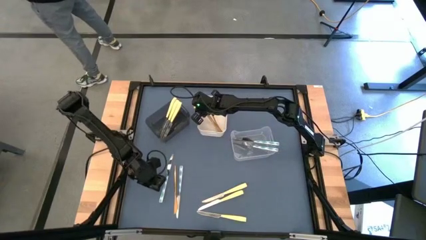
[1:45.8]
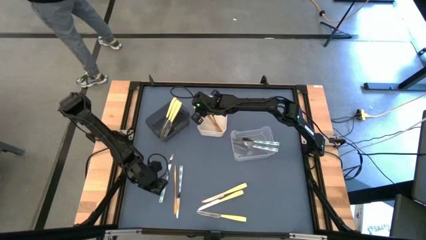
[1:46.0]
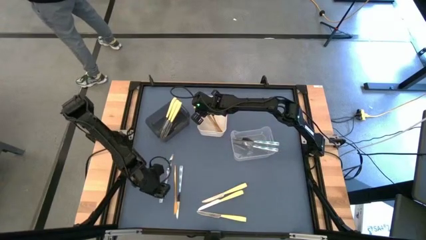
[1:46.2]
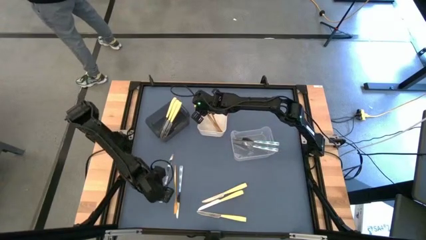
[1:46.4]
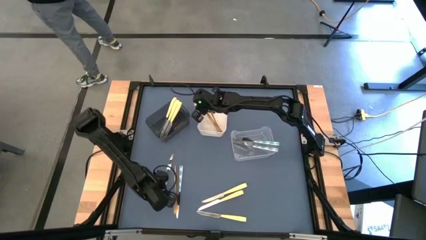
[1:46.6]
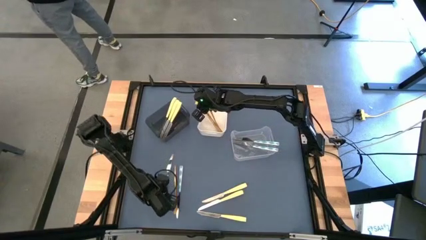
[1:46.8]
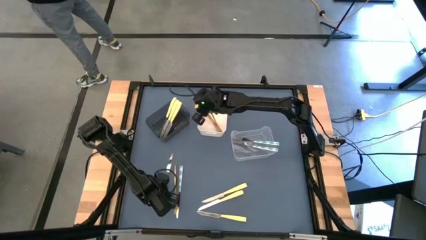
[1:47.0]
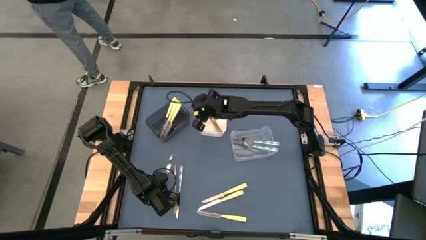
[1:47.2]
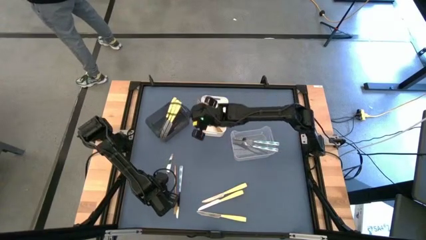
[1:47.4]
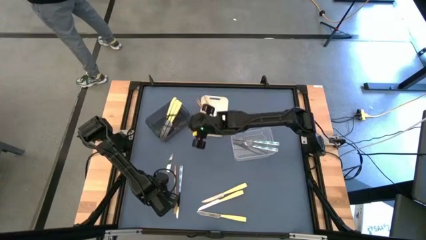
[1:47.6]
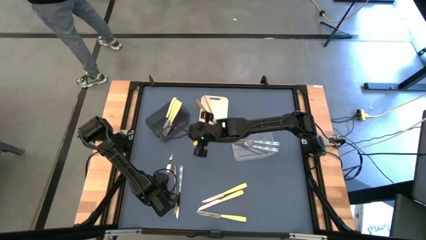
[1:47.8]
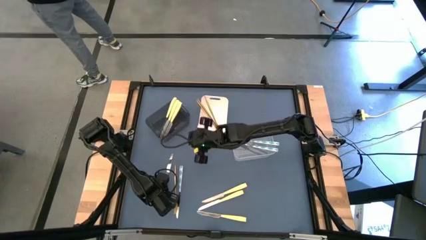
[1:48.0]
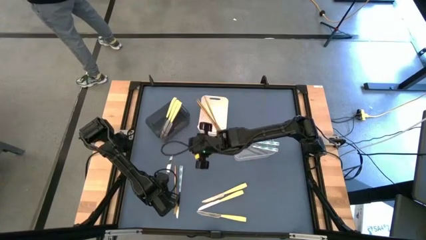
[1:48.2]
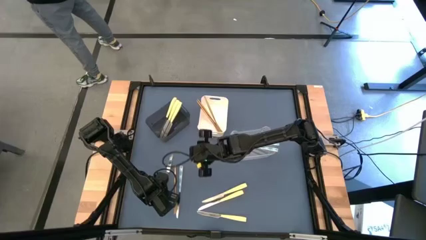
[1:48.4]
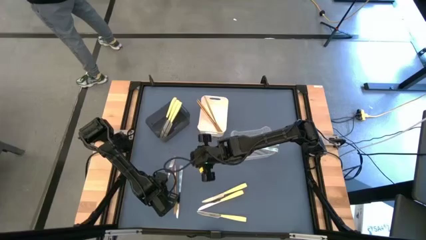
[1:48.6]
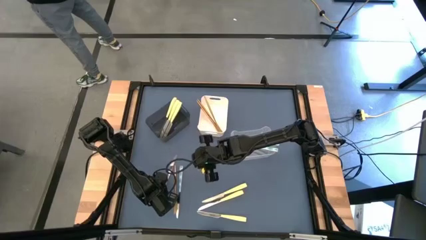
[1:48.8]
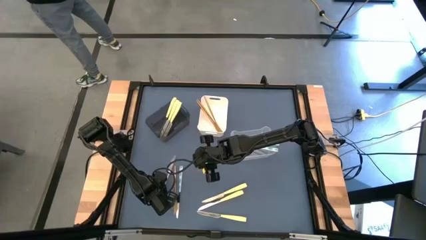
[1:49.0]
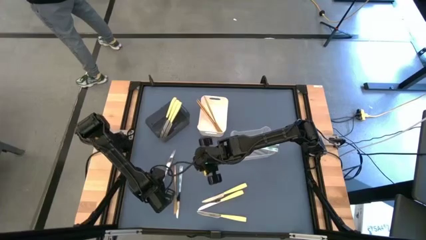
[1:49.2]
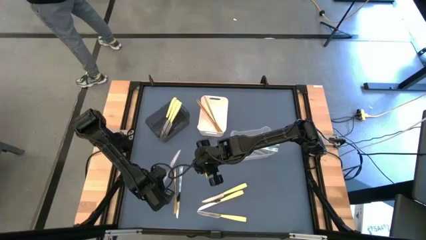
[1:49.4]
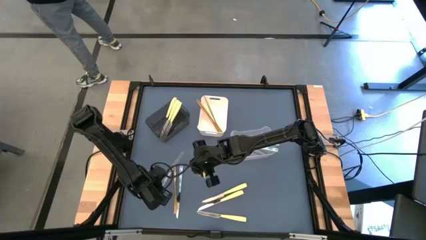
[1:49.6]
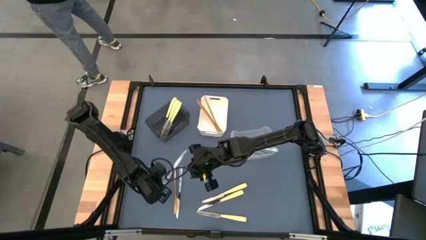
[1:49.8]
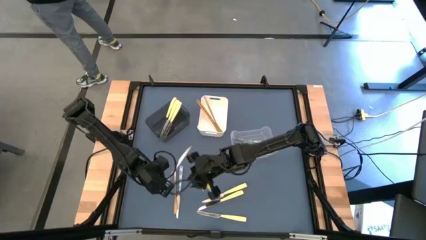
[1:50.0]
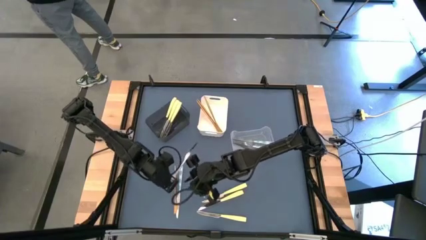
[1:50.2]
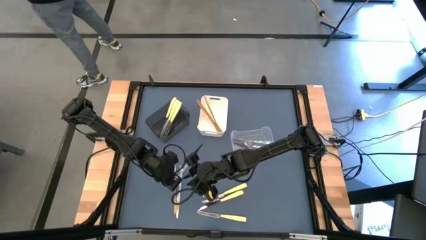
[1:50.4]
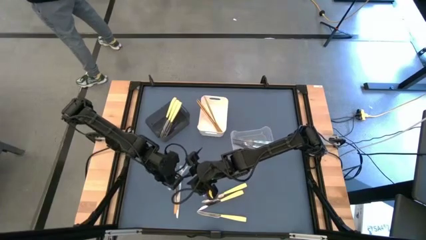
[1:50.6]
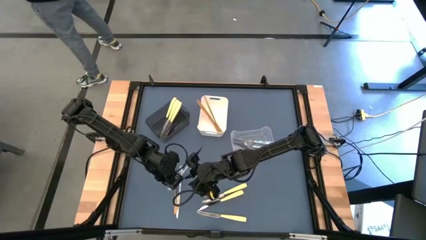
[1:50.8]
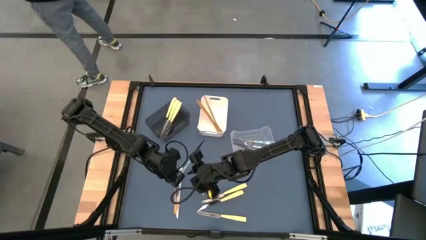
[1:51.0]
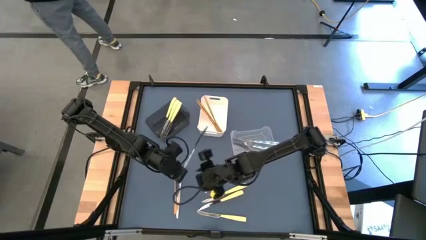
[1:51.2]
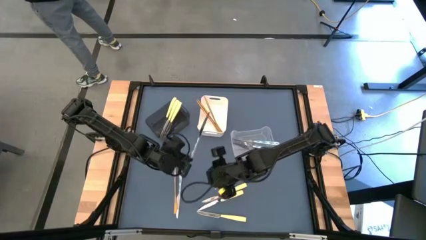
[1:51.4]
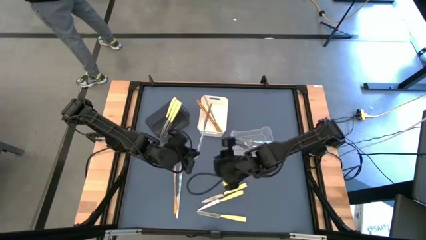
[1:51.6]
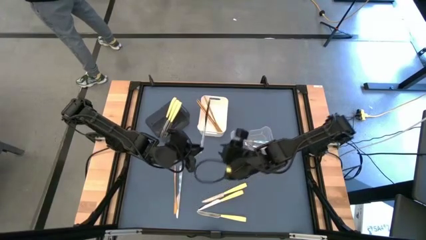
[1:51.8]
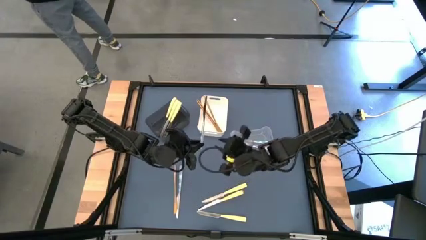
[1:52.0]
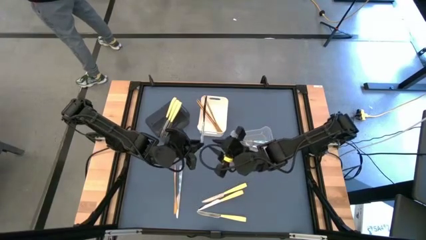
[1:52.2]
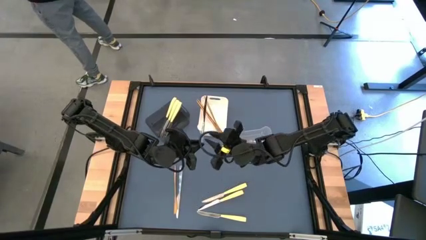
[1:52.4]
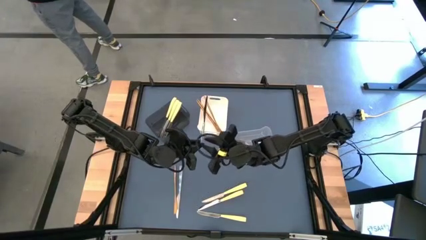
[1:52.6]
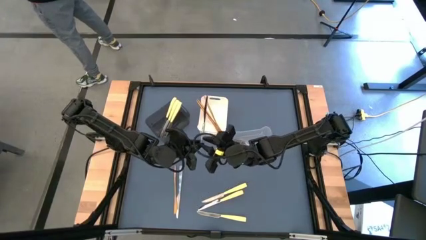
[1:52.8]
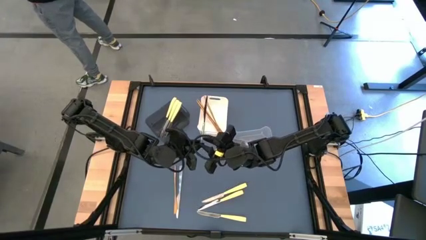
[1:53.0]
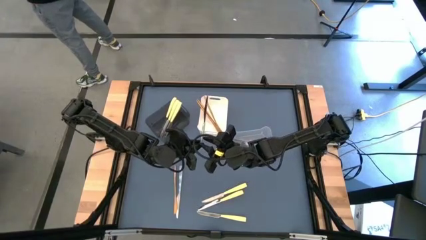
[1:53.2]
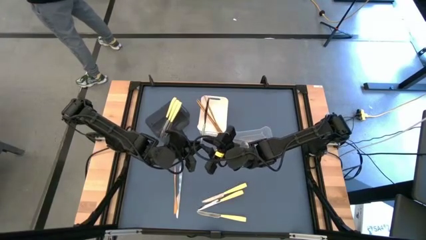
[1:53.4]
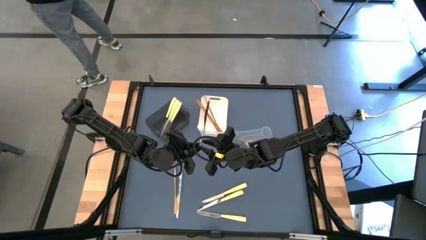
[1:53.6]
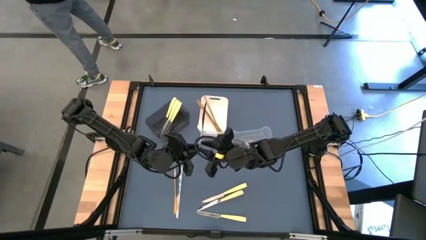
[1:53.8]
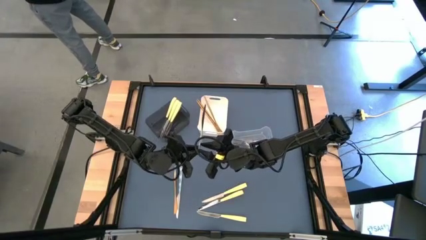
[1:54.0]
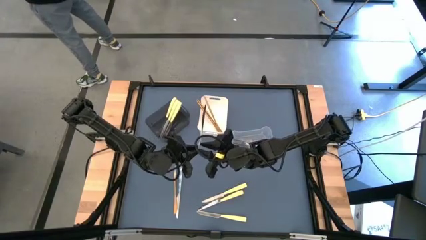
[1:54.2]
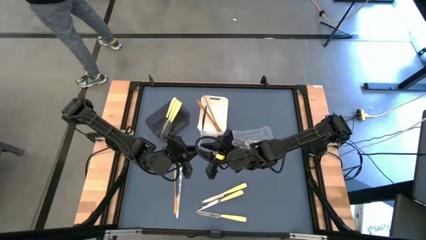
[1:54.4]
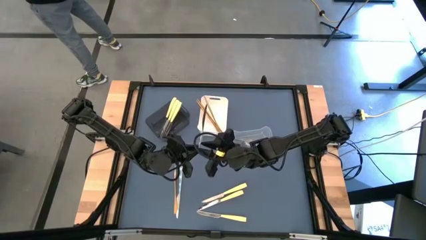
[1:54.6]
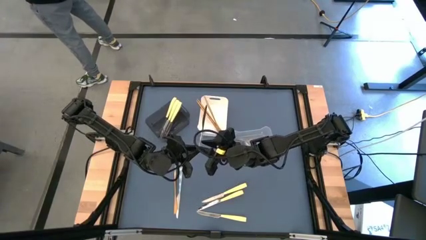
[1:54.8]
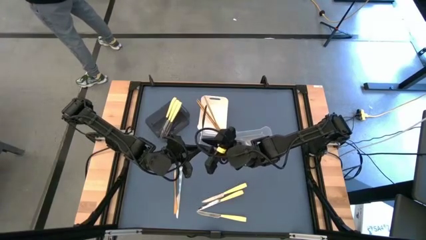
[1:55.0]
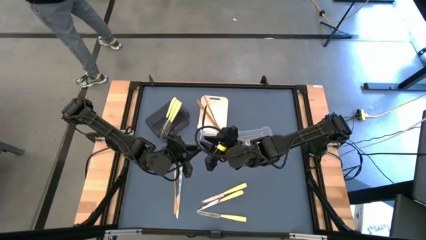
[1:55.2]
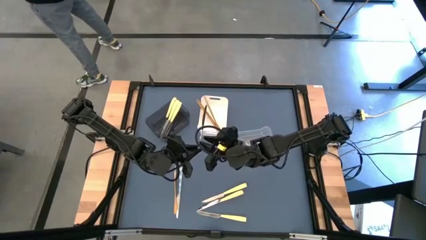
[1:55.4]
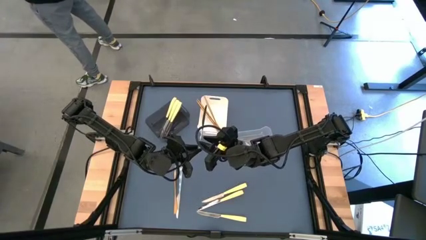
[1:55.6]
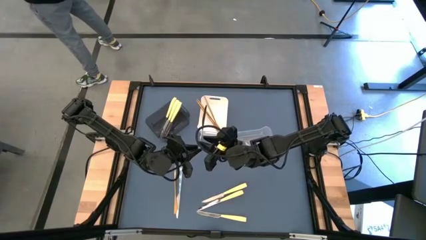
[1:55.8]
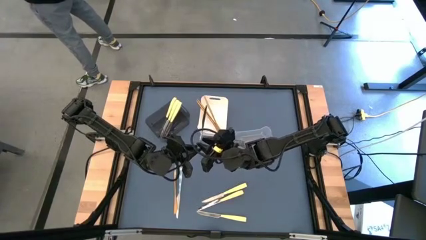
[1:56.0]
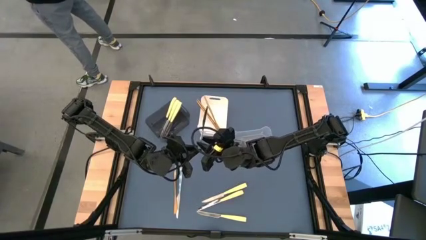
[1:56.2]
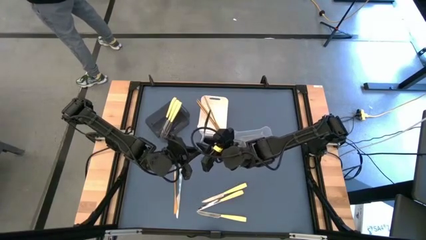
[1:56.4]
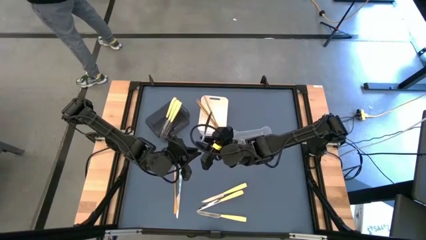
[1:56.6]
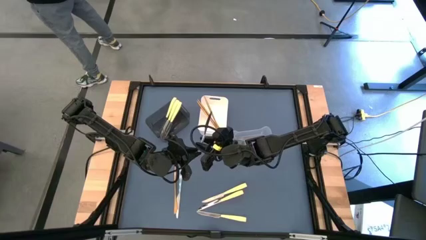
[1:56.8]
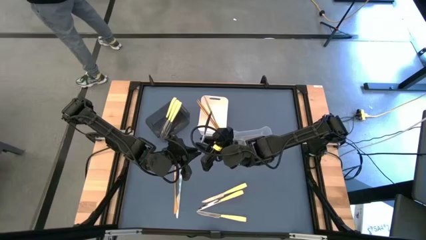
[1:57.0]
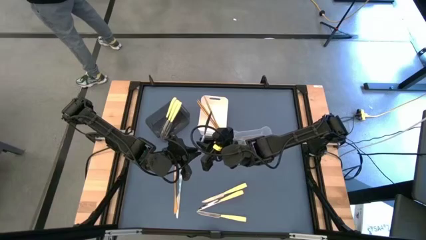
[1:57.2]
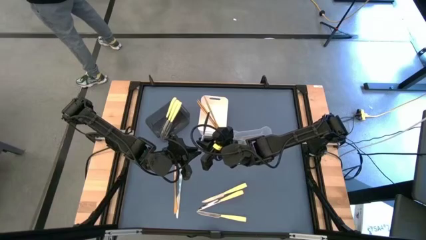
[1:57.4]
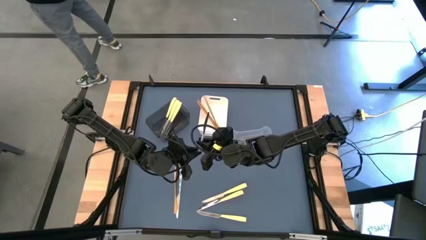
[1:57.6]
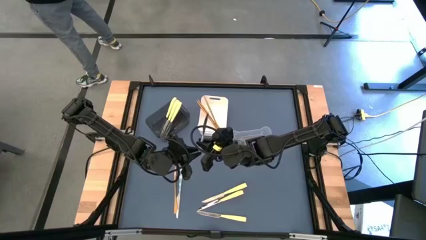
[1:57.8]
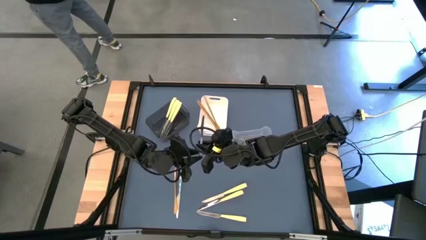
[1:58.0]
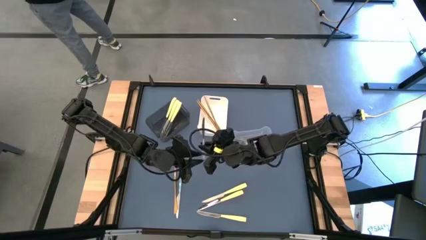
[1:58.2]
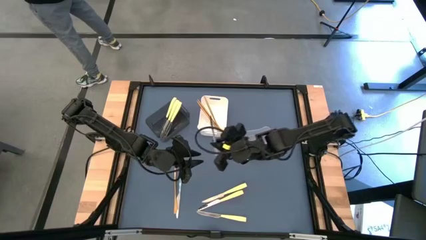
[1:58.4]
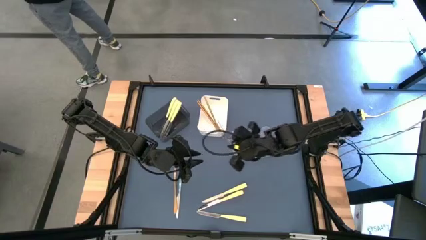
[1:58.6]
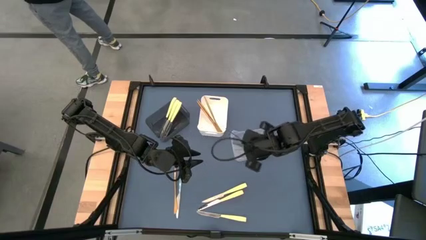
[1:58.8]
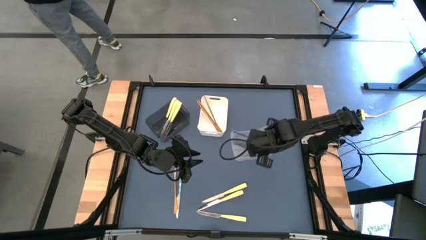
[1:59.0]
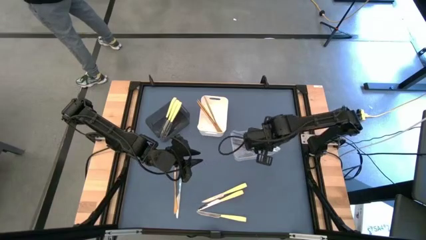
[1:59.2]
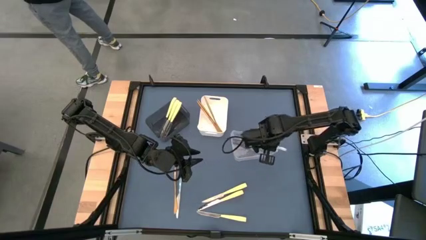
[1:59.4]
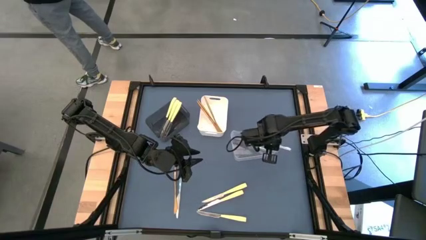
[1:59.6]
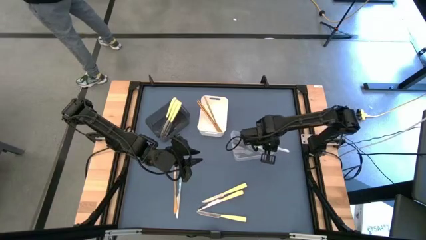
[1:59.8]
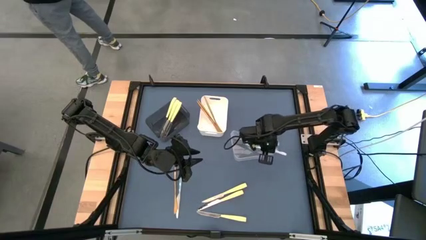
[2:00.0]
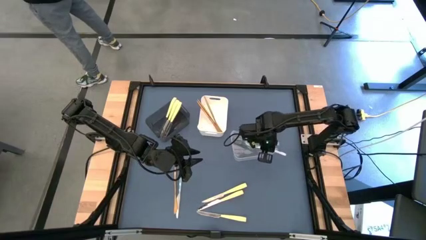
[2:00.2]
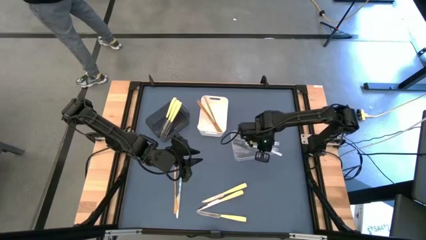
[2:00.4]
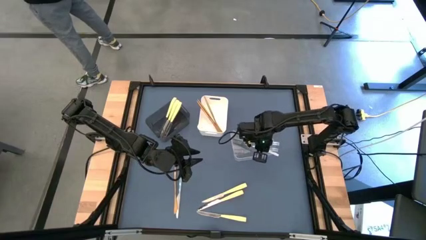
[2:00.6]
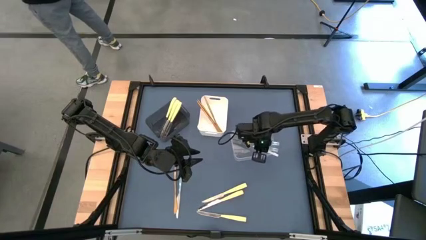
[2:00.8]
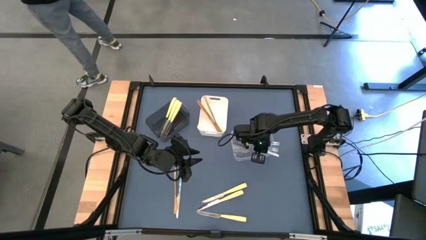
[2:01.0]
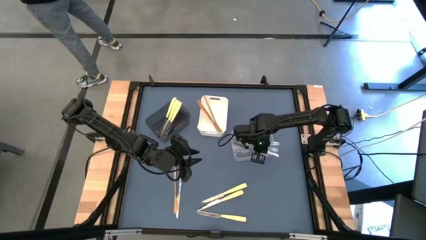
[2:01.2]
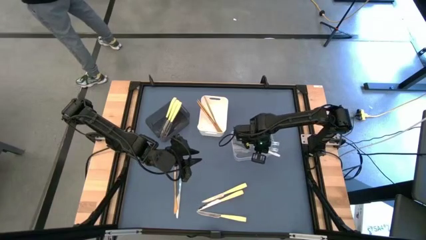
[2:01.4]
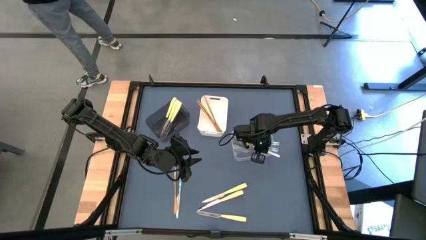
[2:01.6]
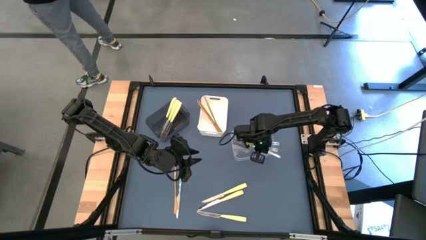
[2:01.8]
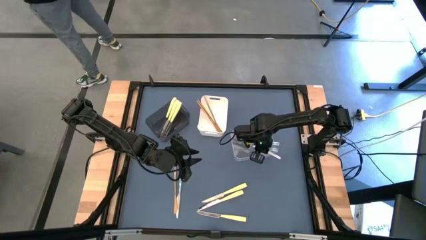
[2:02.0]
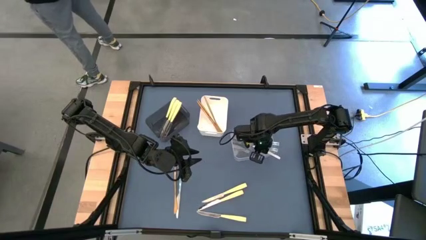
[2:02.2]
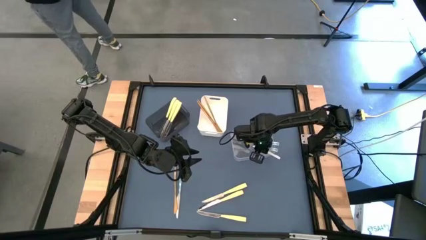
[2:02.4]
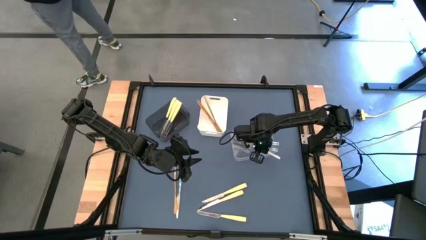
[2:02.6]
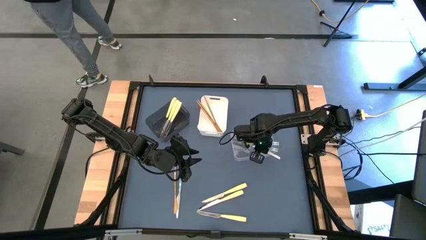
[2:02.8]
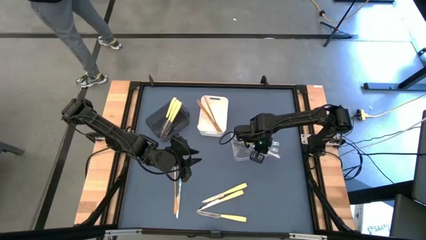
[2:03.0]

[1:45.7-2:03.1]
Task: Sort silverware by color (type)
Put the left green knife into the transparent bin
